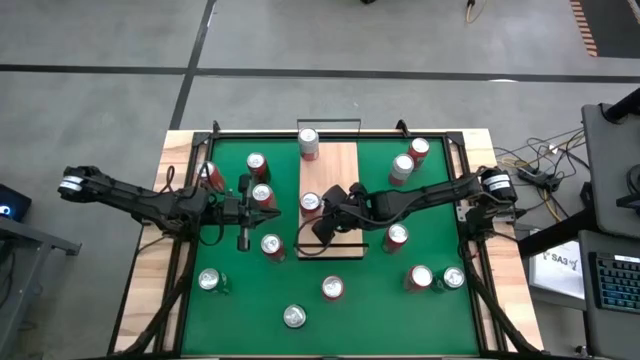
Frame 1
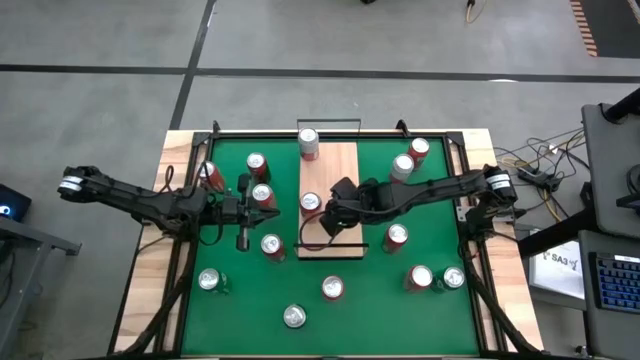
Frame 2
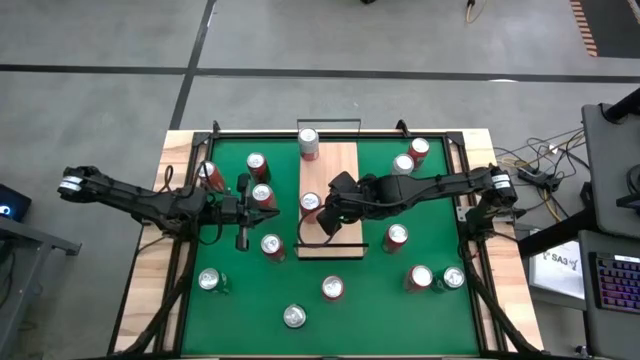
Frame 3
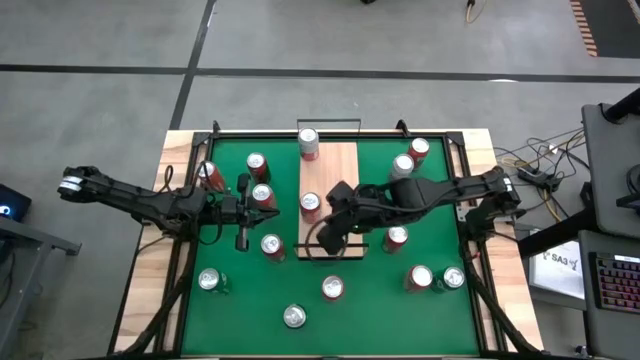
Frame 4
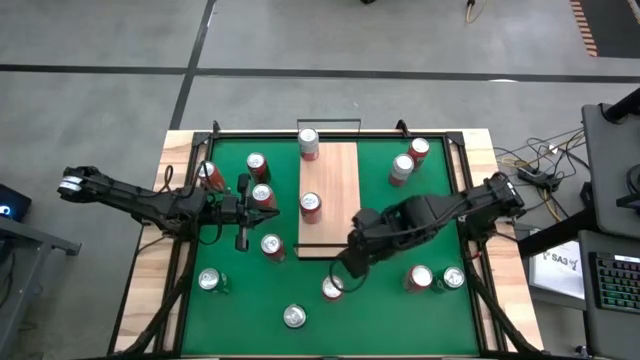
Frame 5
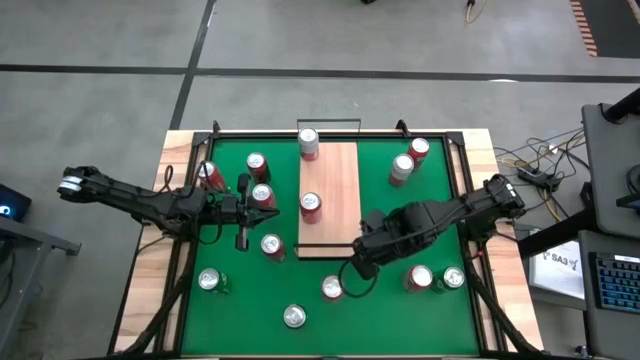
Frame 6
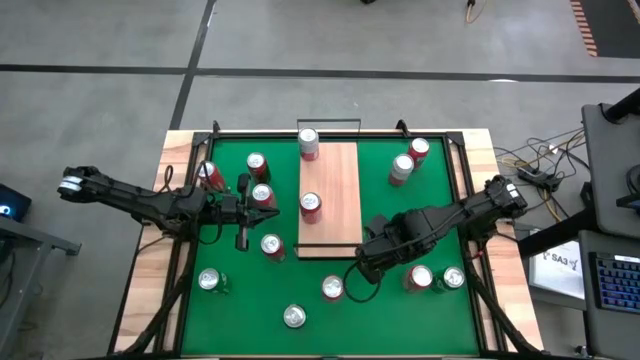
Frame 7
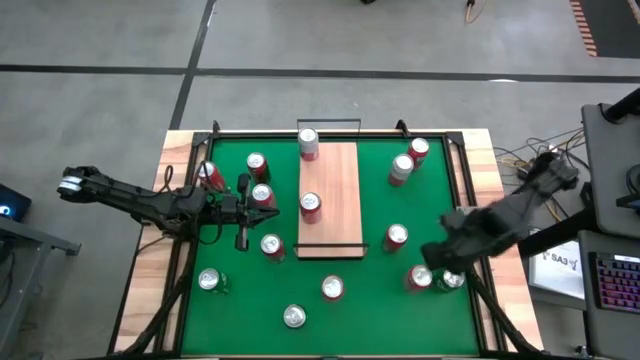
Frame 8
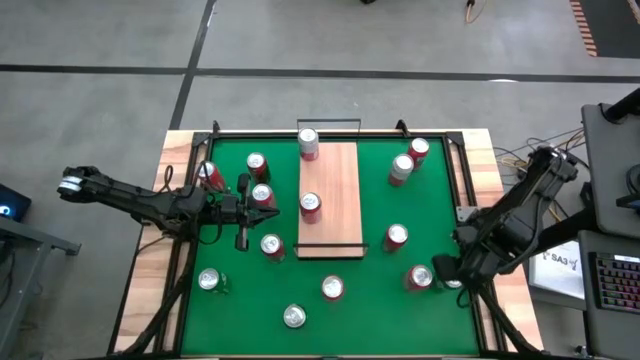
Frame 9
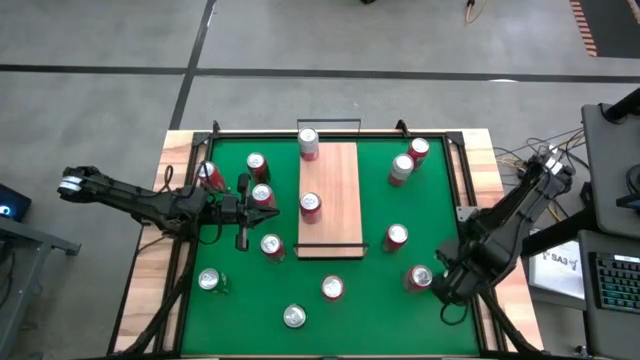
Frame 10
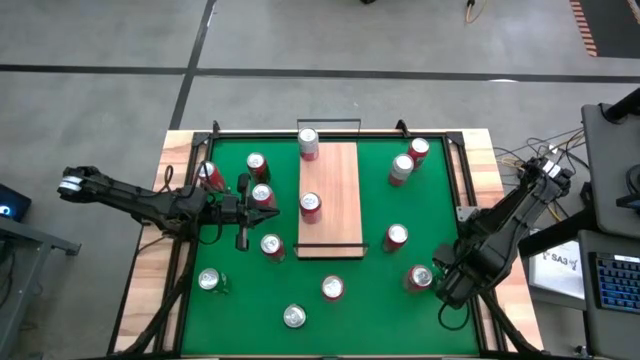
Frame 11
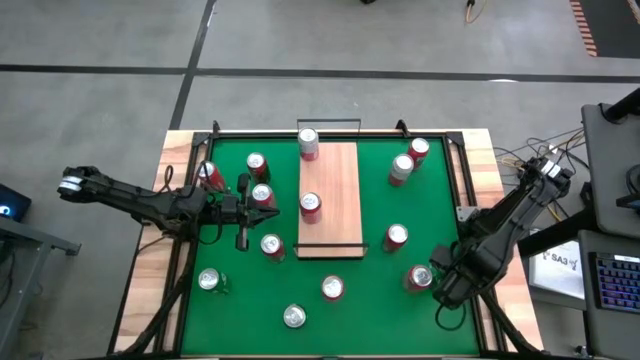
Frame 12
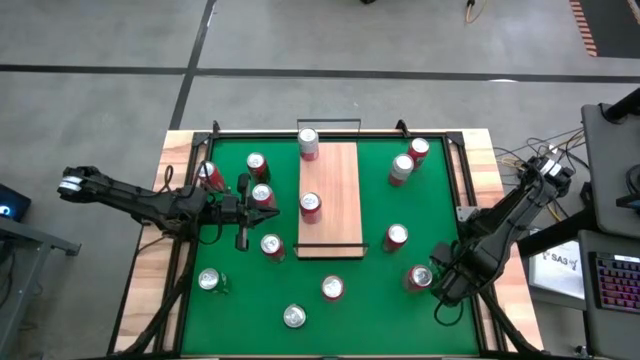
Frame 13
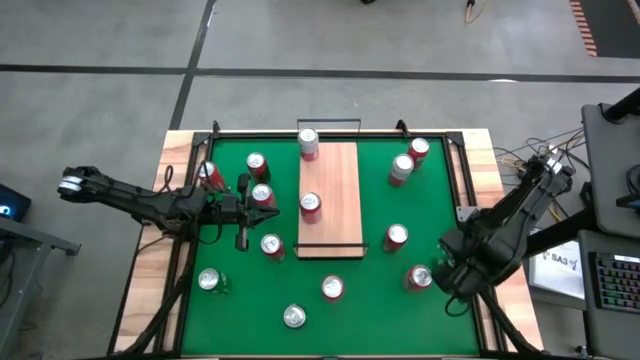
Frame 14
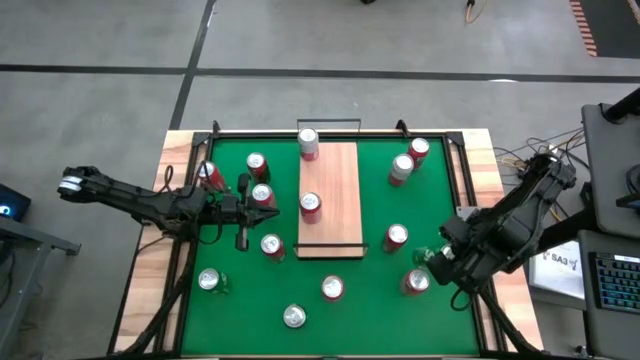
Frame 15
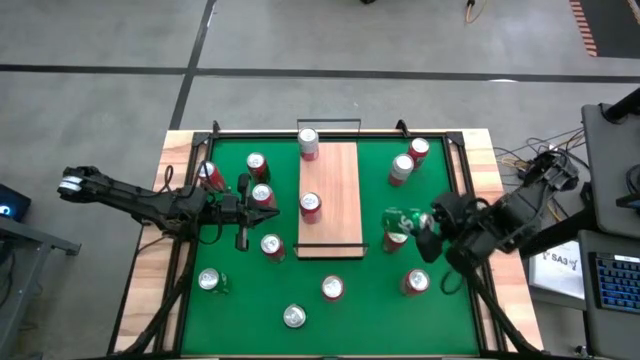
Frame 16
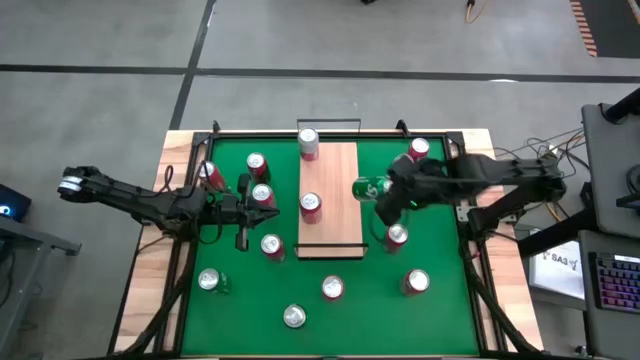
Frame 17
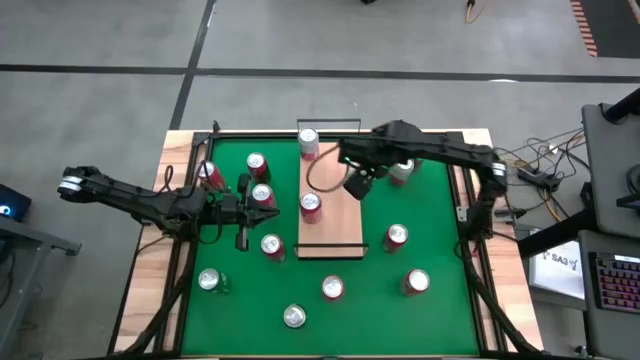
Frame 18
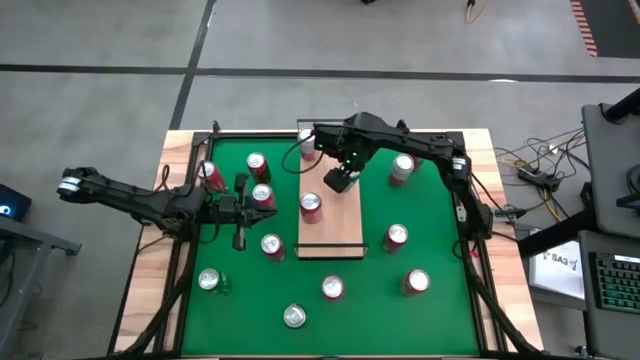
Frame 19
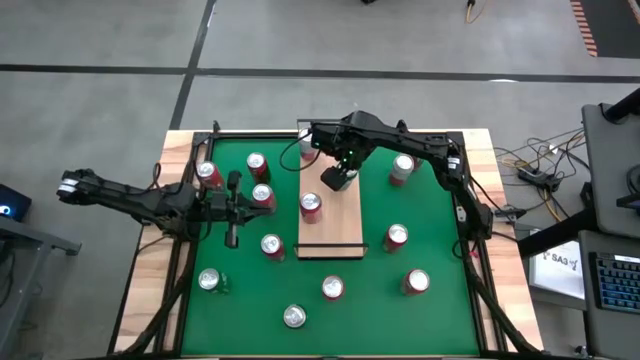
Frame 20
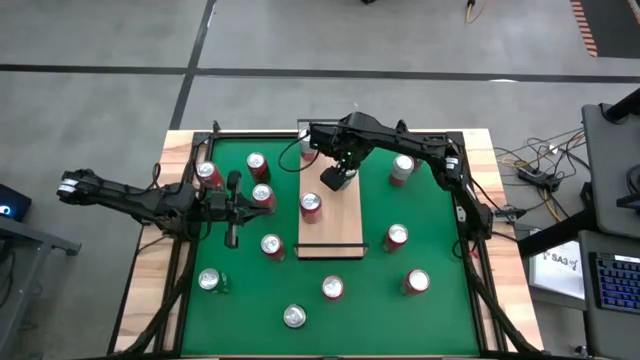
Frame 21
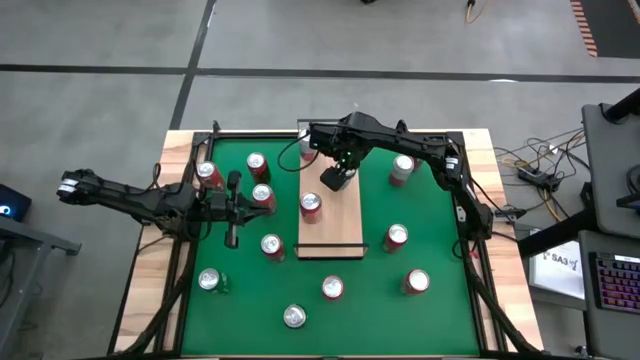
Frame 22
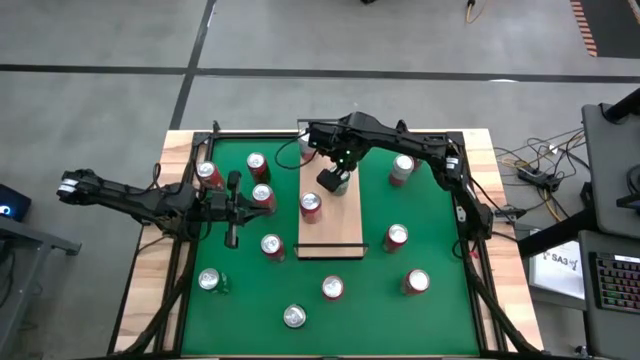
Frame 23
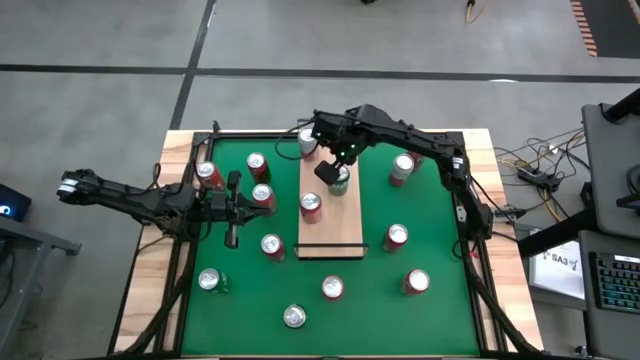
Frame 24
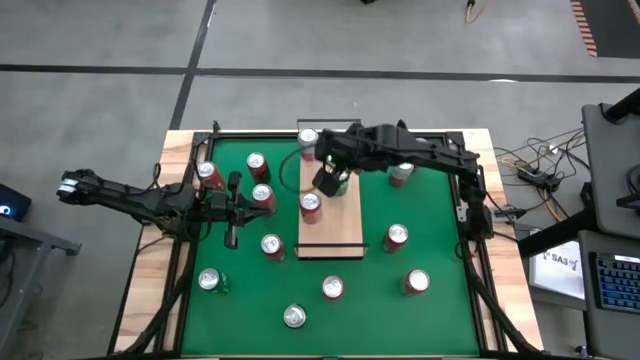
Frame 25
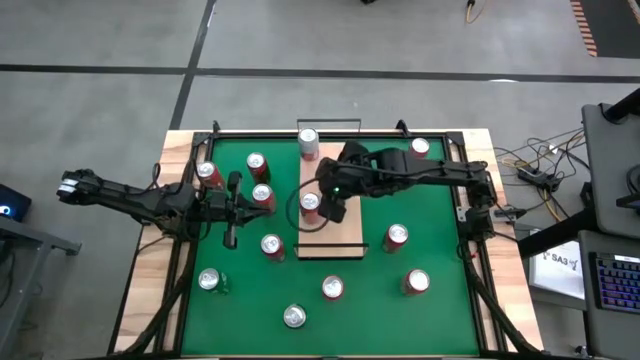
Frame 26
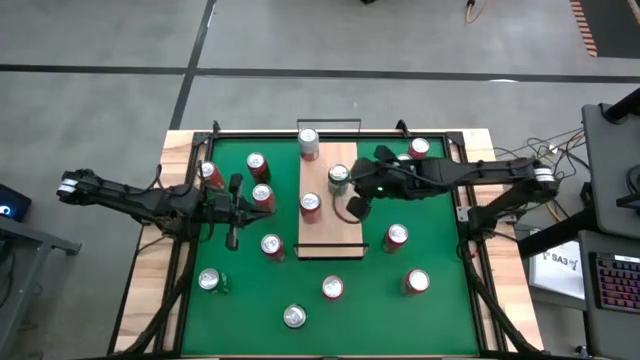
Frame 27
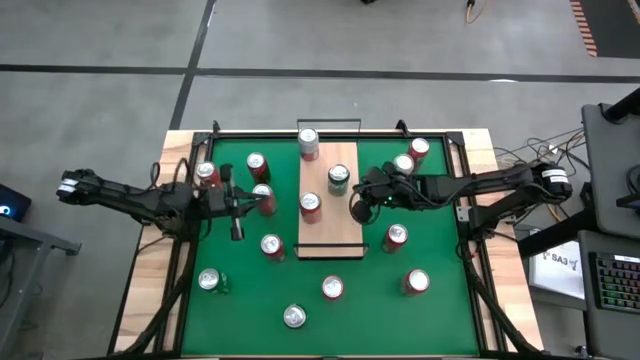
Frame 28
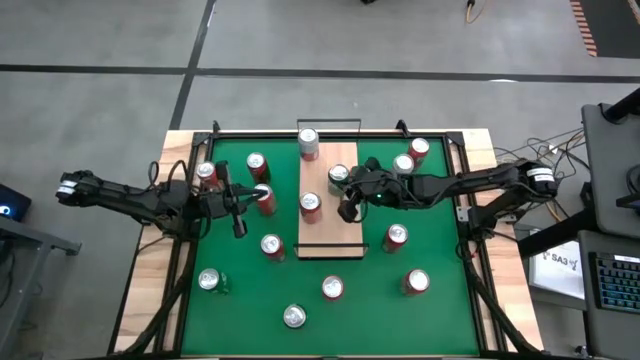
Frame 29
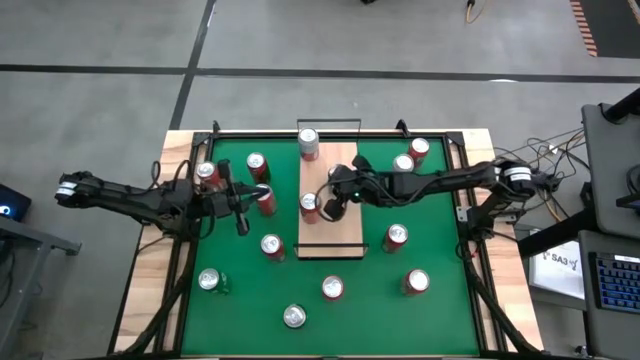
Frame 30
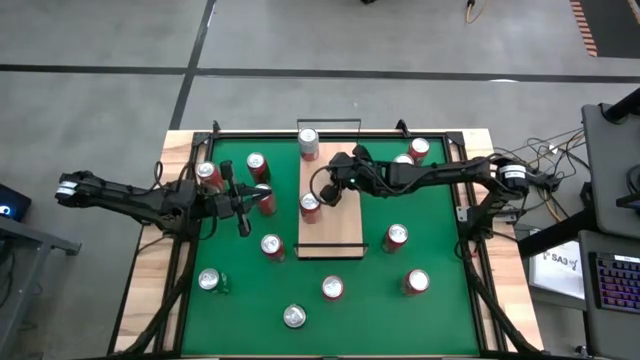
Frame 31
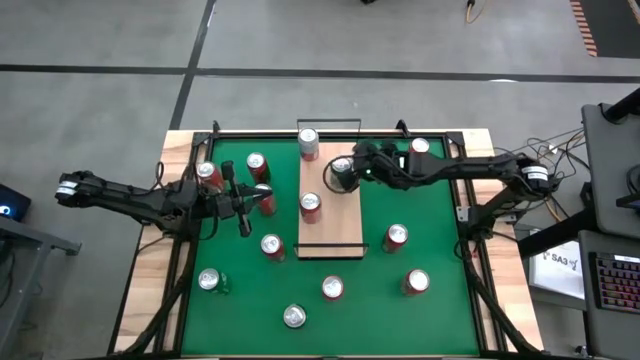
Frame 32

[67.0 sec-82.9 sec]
Task: Place canned beverage on shelf
Put the green soda can on the shelf

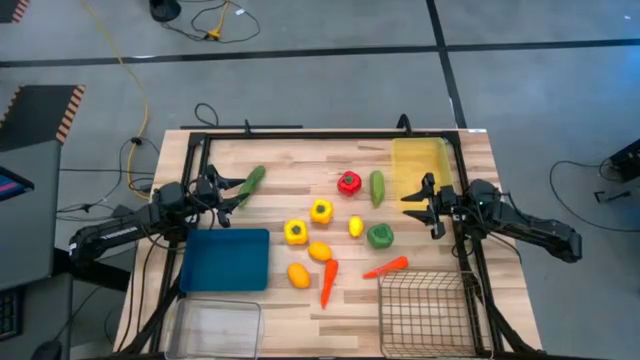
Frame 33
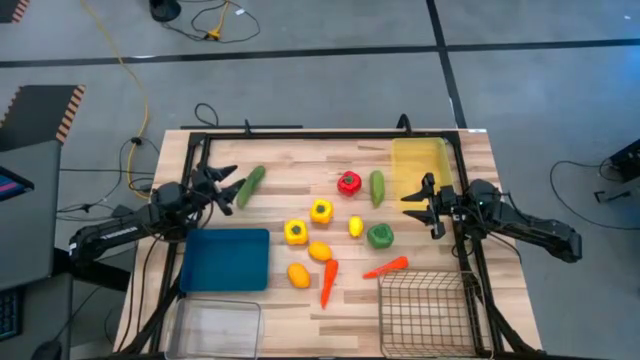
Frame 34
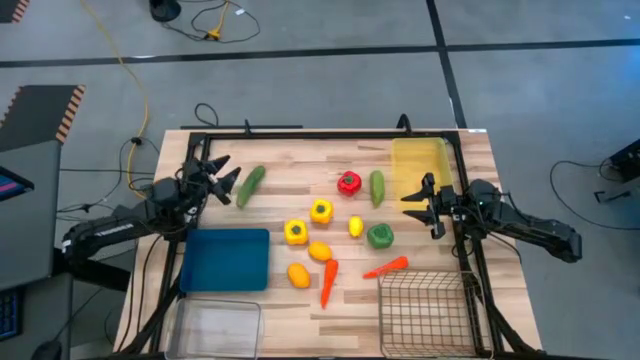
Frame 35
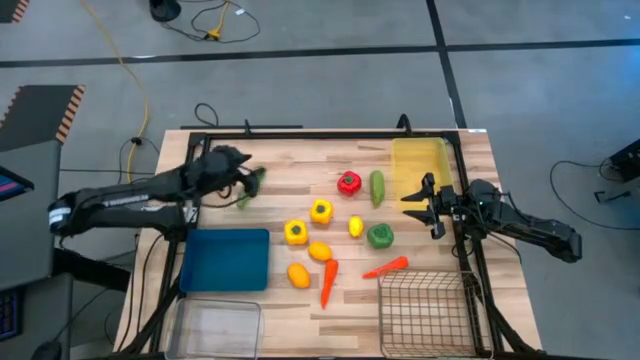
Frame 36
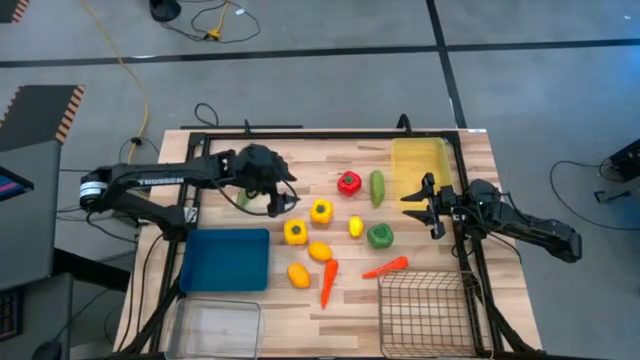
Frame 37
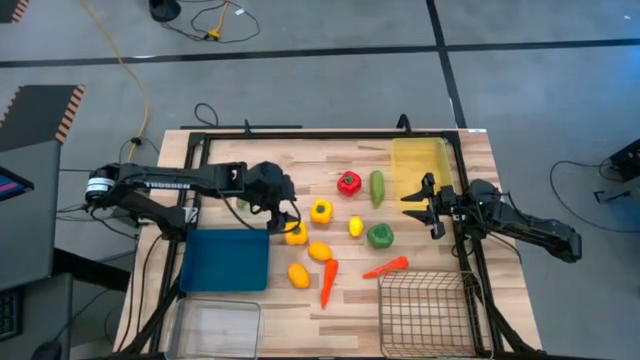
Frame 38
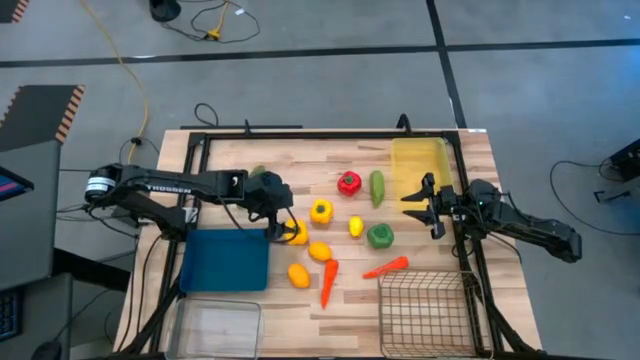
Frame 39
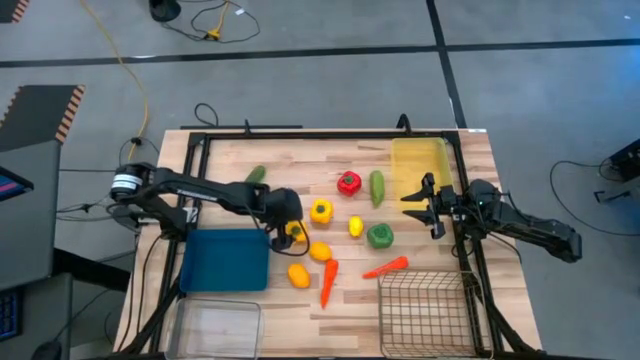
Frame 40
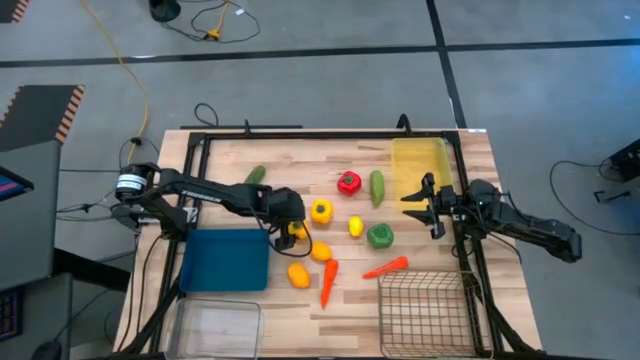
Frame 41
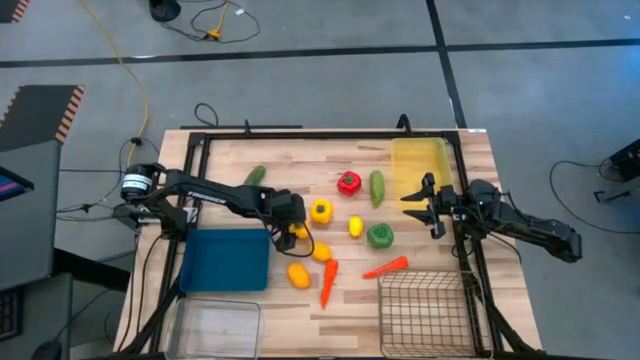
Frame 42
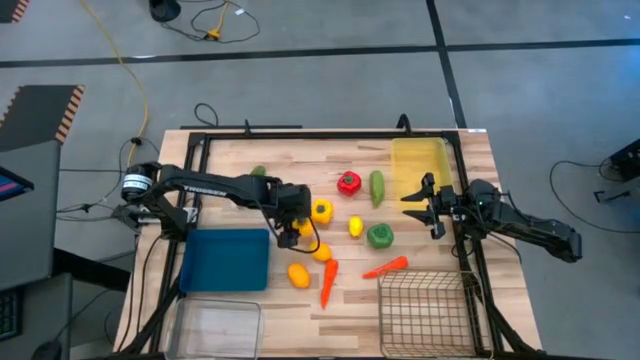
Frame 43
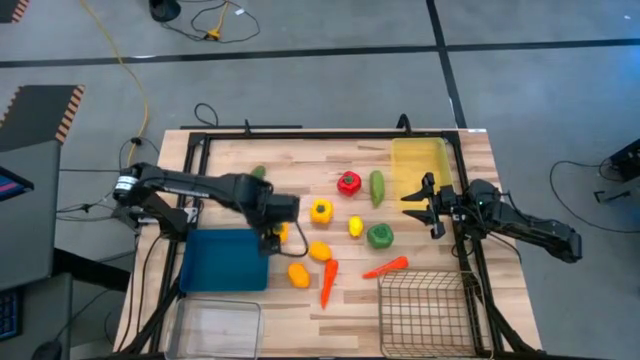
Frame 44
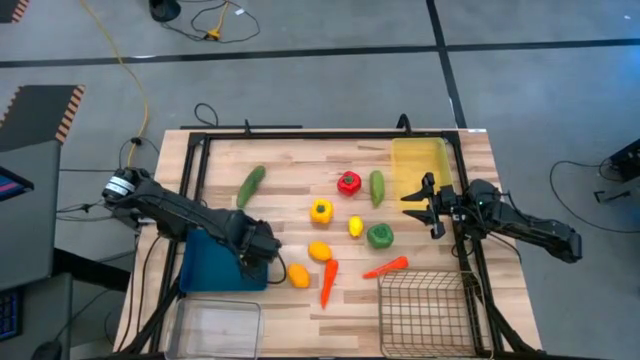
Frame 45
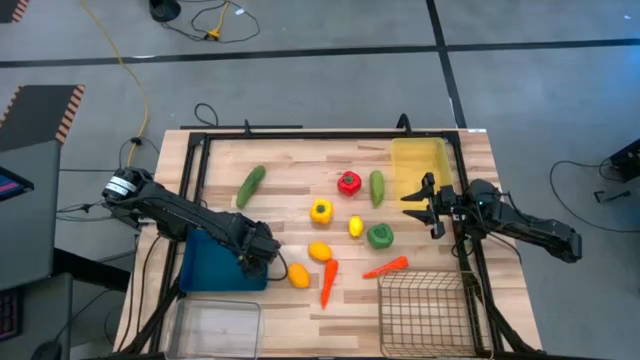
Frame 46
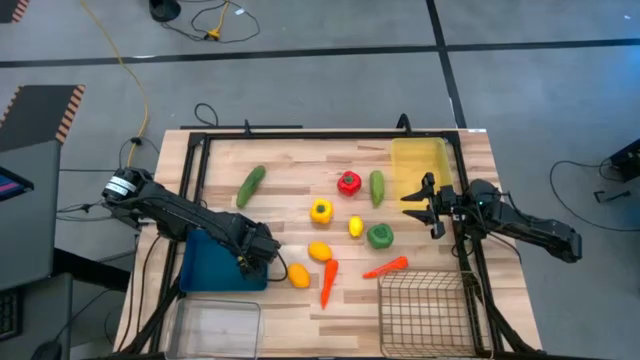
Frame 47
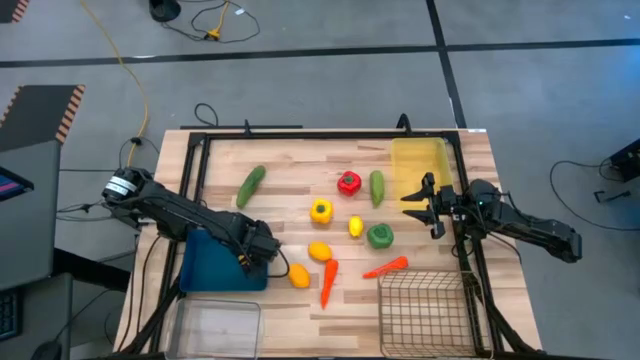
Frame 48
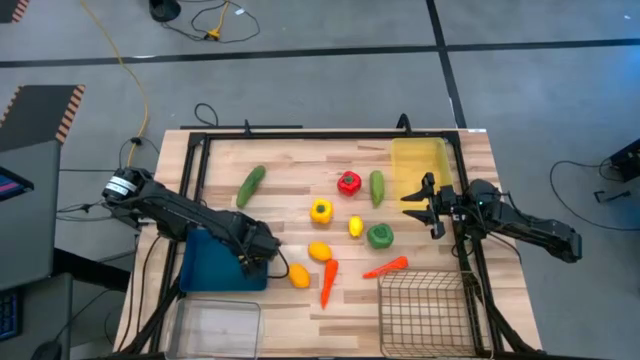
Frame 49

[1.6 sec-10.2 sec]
Task: Sort produce into baskets
Put the bottom yellow bell pepper into the blue bin
